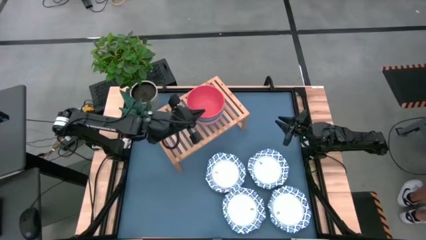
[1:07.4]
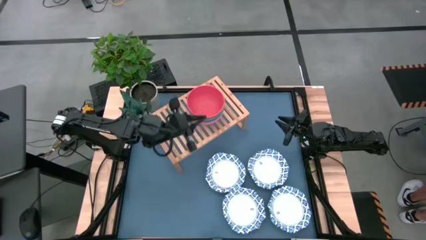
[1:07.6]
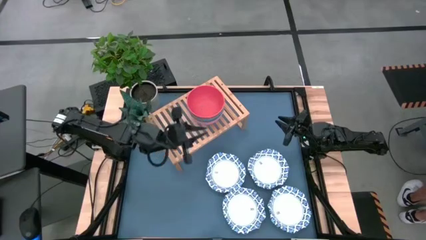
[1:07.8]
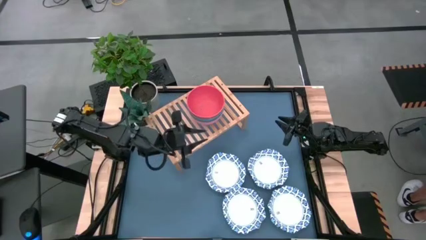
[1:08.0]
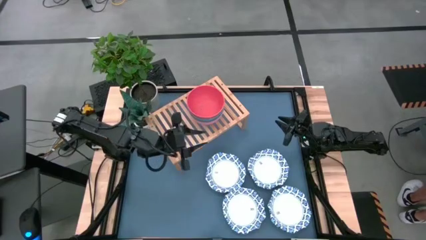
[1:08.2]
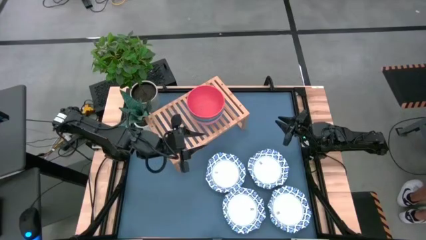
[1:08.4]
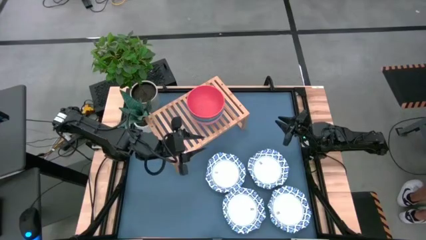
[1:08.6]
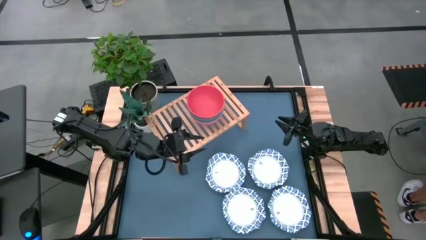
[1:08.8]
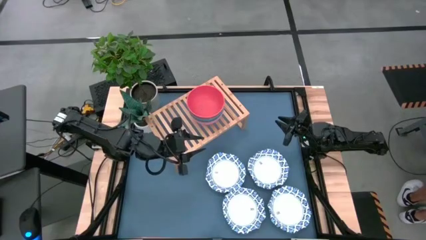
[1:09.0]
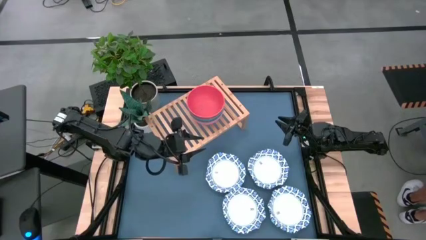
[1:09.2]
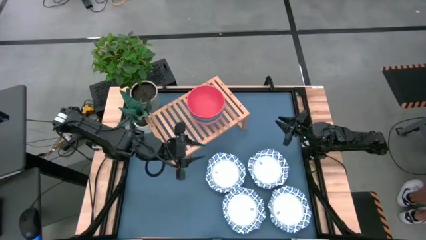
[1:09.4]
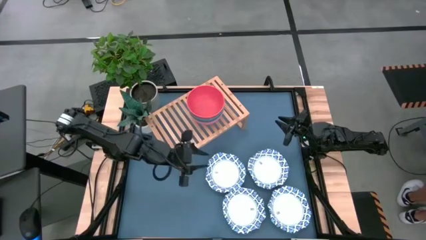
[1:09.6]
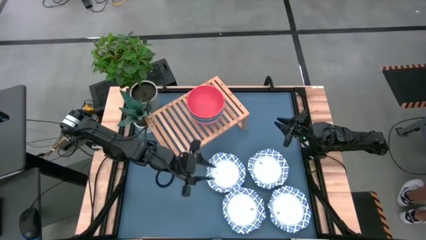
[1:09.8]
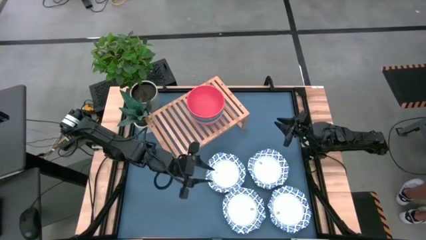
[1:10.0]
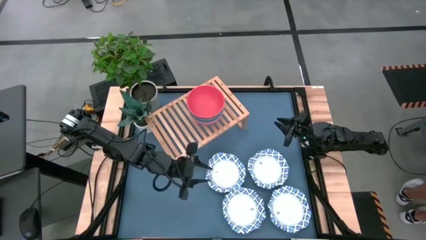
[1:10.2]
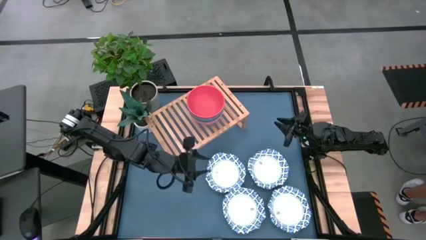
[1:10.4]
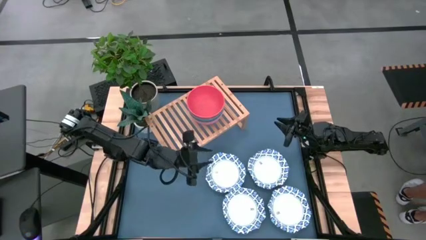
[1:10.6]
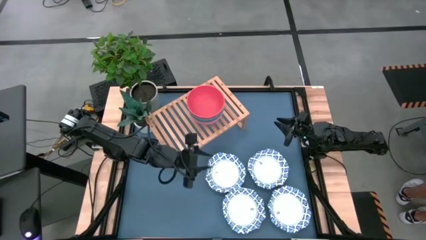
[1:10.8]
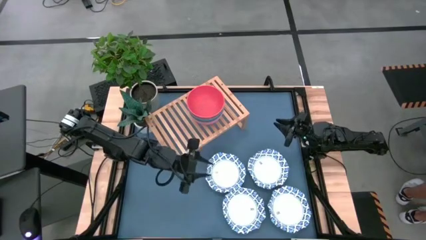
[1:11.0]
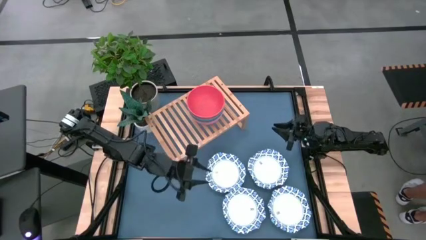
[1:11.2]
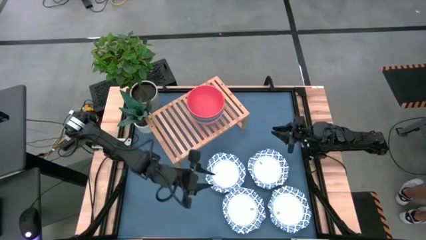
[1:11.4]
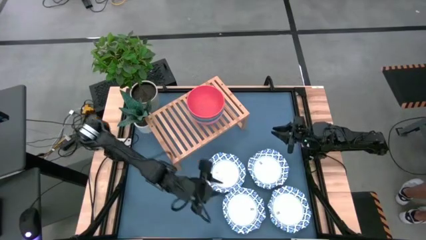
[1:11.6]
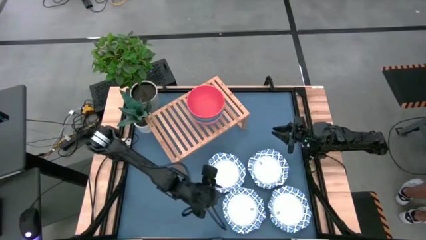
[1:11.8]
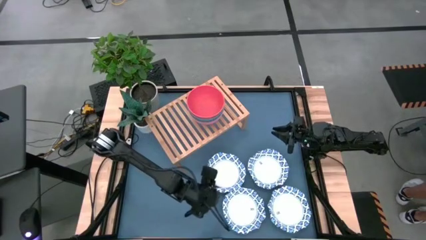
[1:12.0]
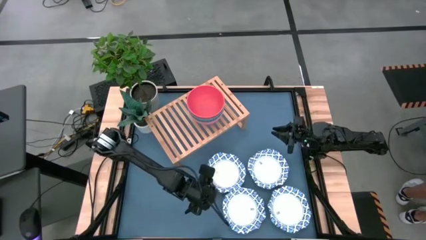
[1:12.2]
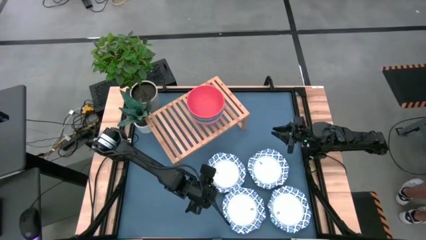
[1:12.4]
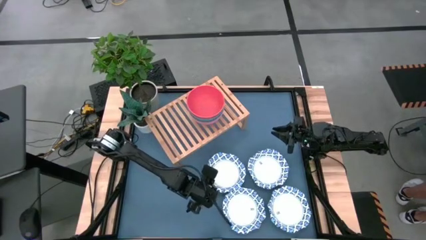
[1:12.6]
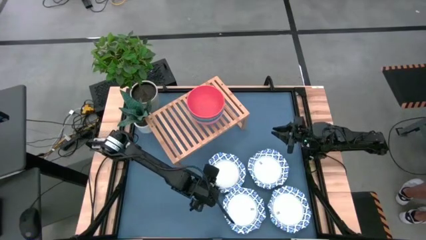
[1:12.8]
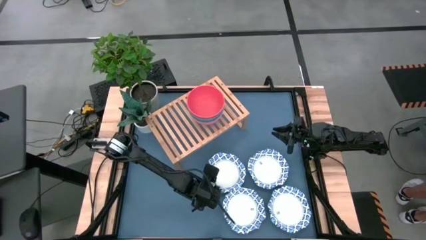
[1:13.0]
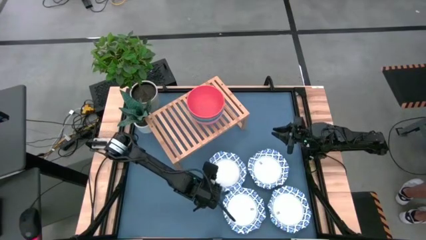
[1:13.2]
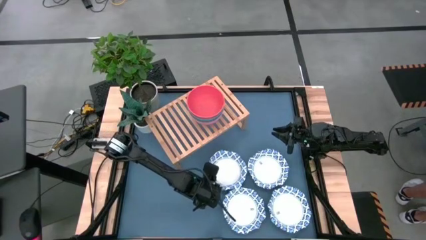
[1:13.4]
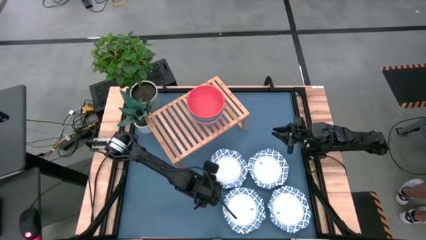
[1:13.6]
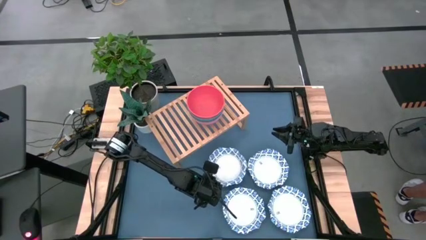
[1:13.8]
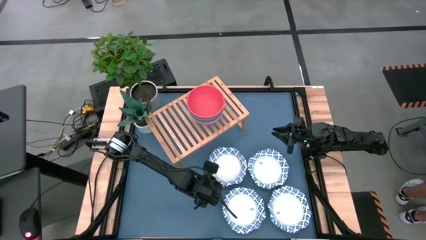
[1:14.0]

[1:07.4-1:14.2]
Task: Place and stack bowls onto a shelf
Put the white patterned bowl on the shelf

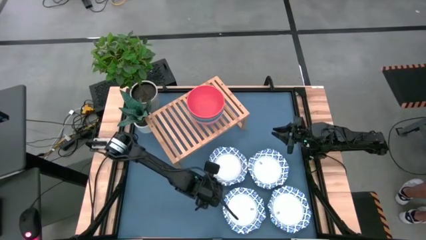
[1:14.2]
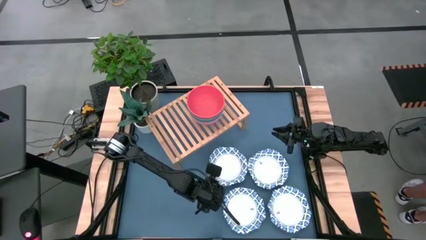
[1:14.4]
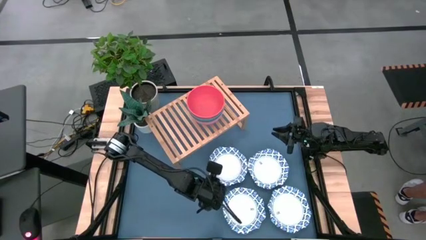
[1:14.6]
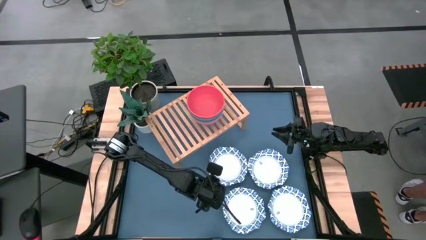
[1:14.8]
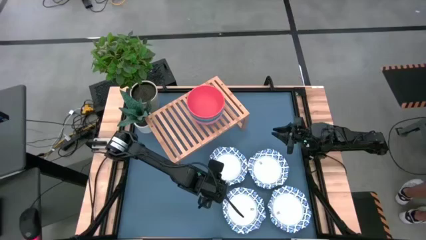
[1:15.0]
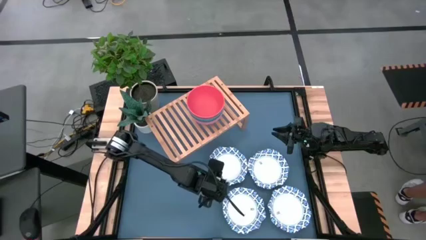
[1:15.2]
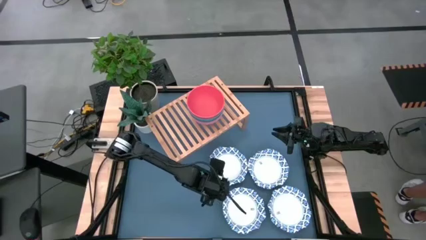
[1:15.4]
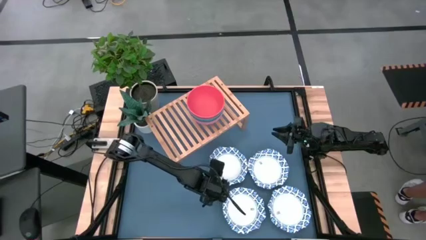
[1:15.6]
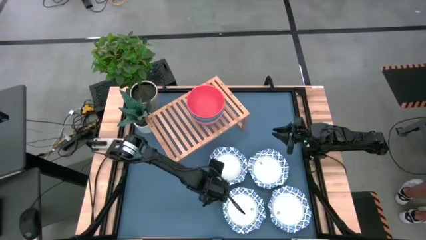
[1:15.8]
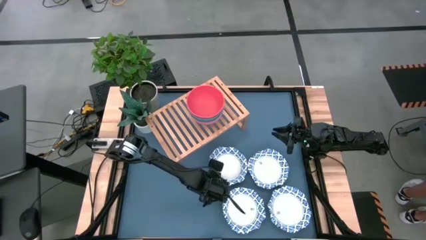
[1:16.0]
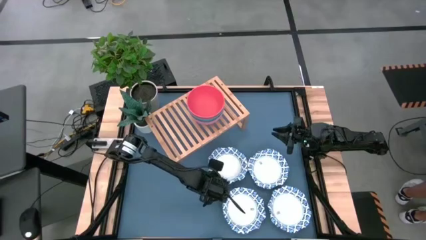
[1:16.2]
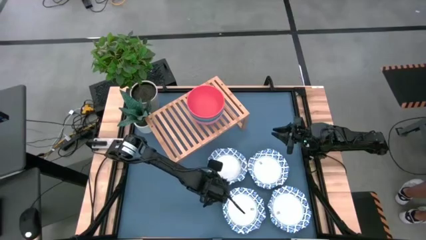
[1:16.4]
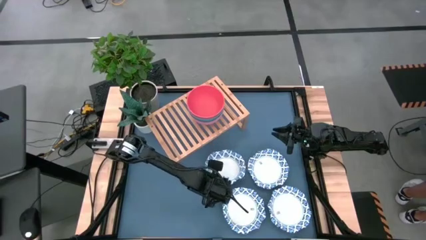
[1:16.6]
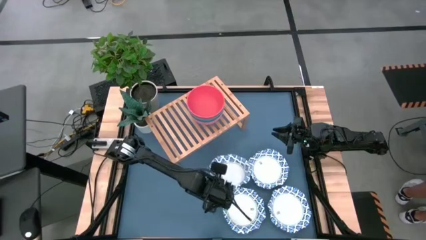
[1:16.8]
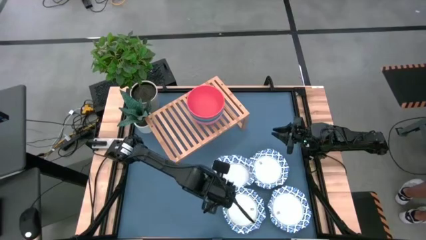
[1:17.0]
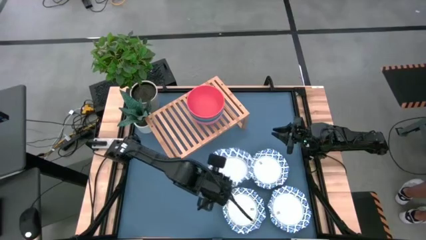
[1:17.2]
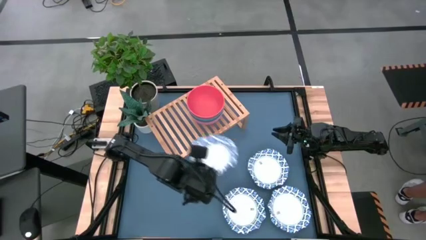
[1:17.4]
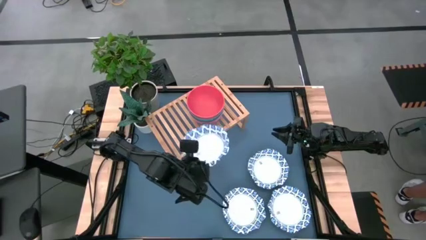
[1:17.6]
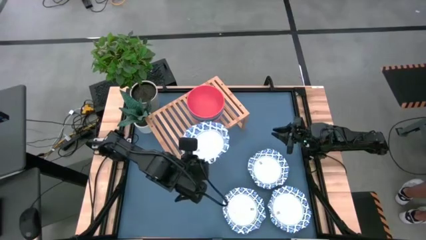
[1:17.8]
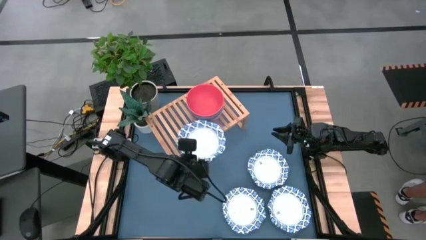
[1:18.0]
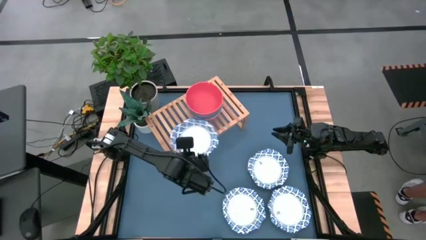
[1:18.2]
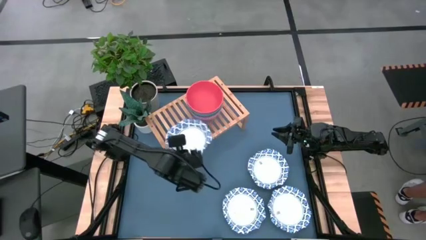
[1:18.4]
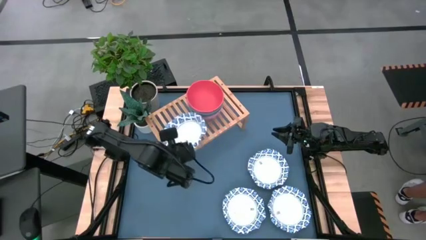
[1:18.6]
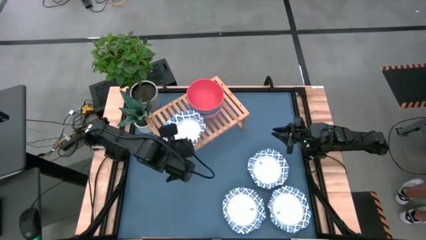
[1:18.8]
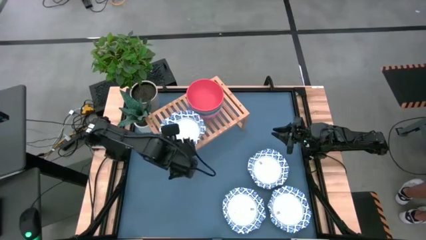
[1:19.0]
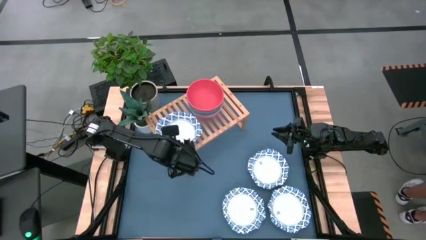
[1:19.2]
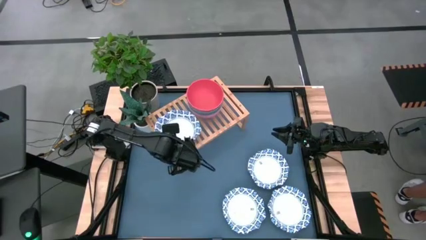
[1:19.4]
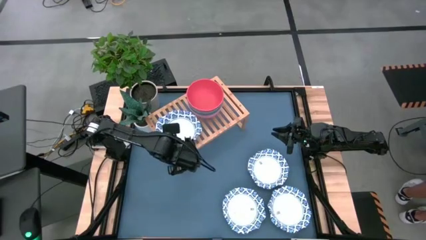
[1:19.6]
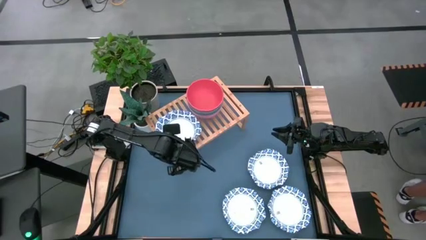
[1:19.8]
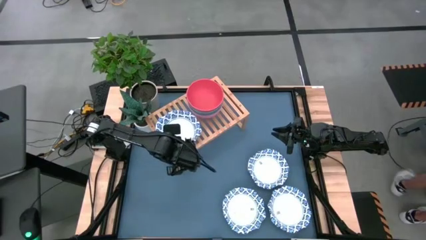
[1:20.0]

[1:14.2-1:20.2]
Put the white patterned bowl on the shelf
